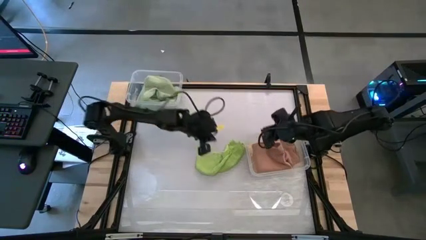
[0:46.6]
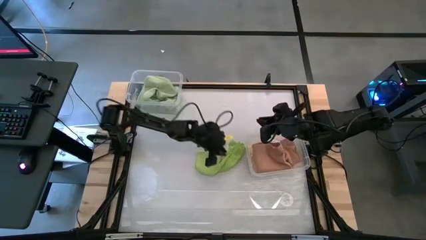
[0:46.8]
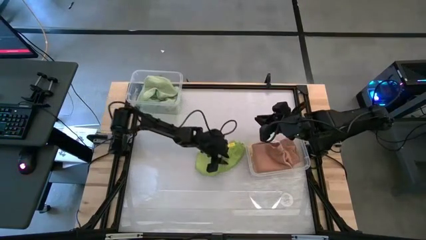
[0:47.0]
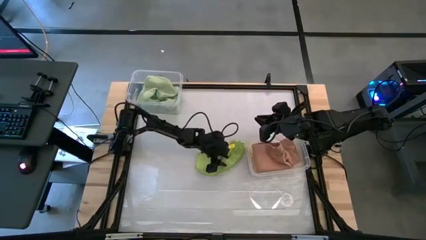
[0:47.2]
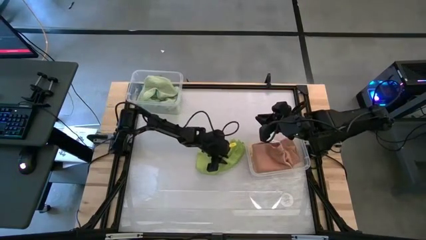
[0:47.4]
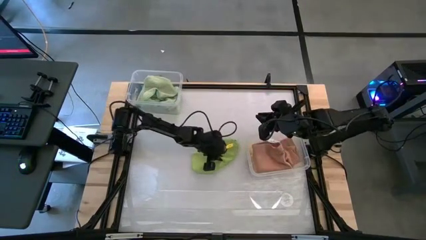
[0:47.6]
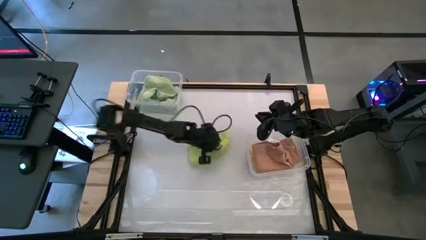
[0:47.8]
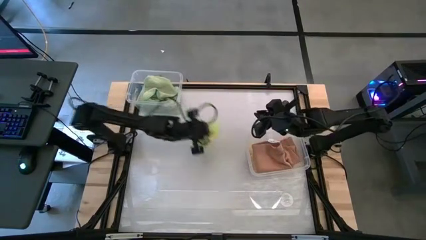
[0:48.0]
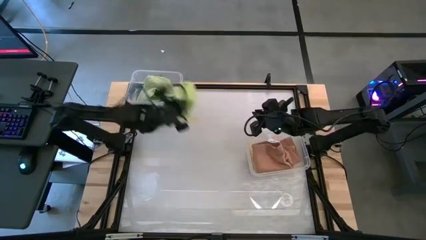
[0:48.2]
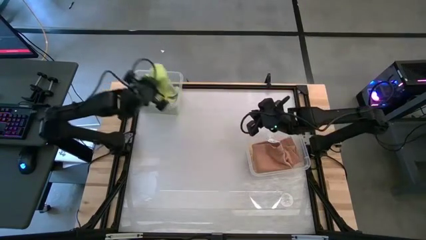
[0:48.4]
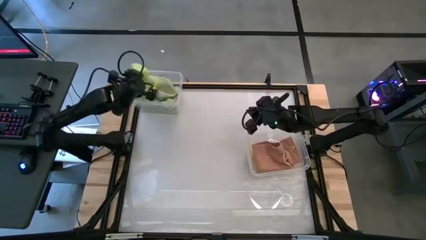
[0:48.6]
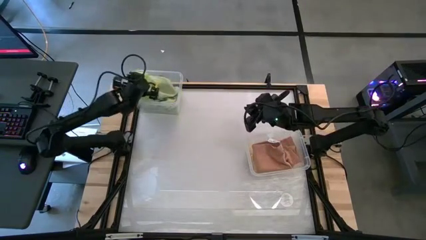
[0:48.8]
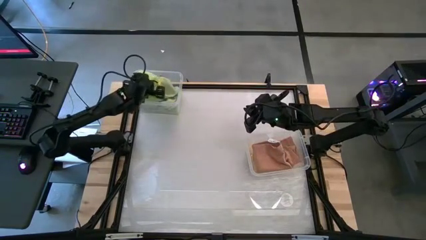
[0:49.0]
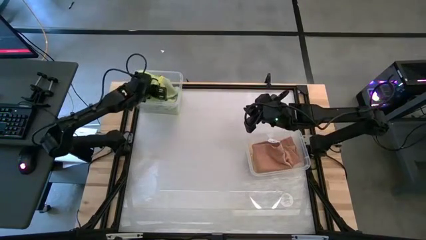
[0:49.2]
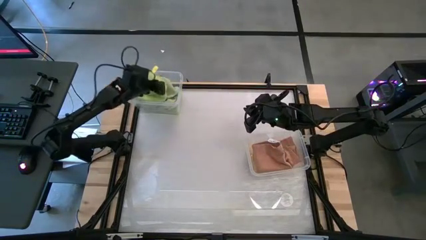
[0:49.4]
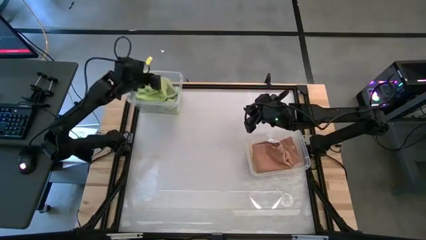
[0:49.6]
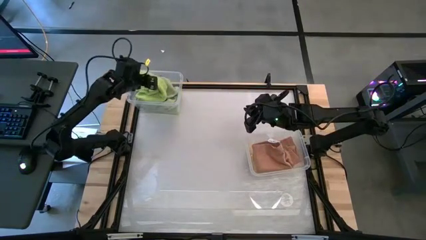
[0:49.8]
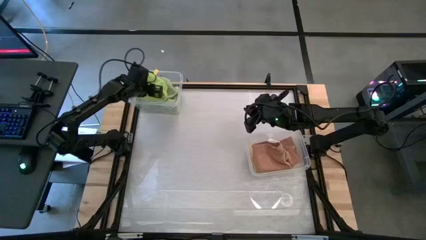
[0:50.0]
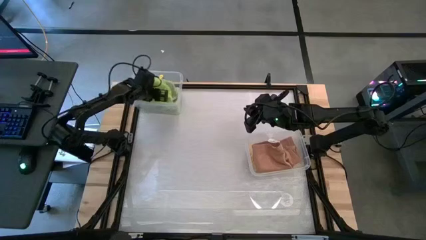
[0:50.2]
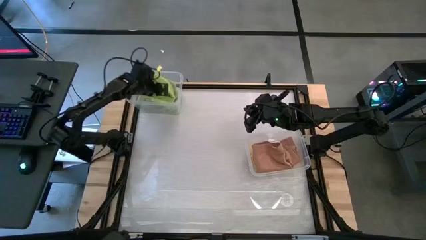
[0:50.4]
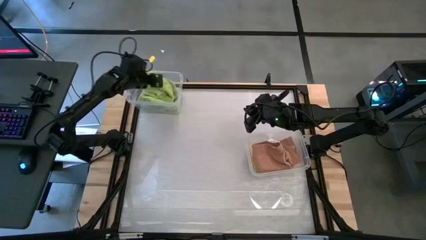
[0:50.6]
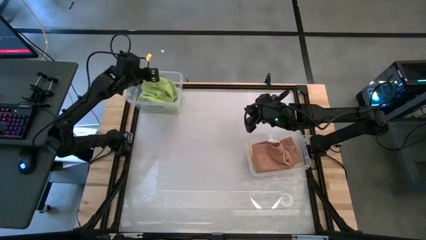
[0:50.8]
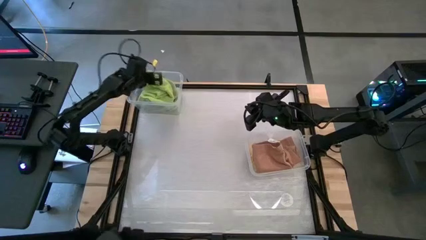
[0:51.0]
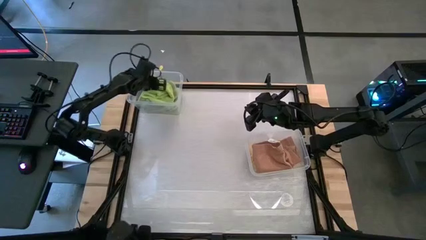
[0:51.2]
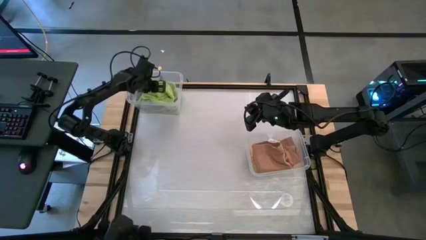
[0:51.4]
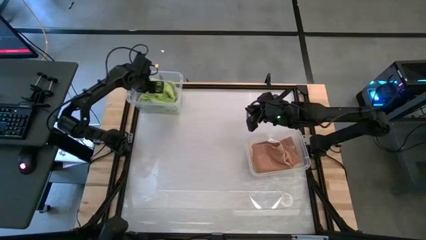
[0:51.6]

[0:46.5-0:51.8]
Task: Sort towels by color in basket
Put the green towel into the left transparent bin

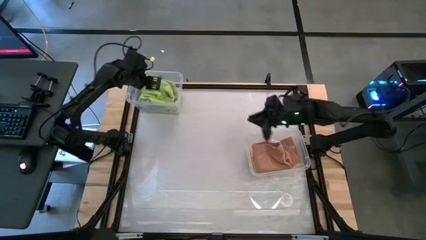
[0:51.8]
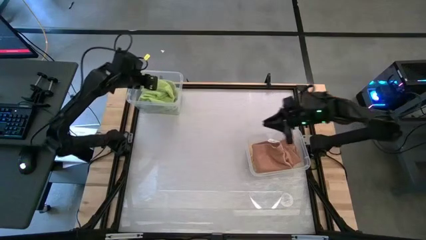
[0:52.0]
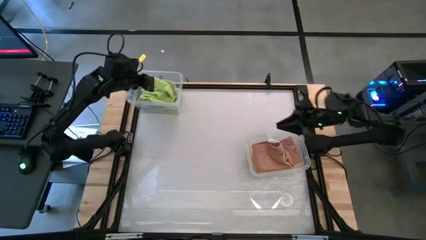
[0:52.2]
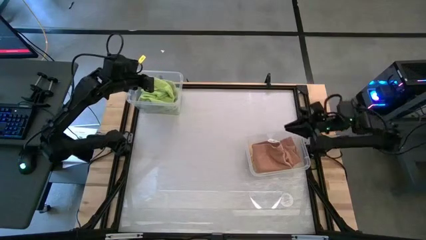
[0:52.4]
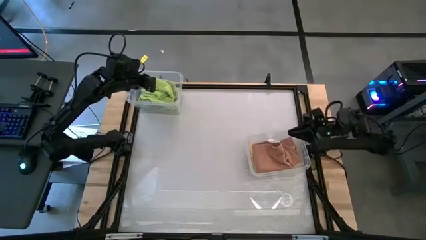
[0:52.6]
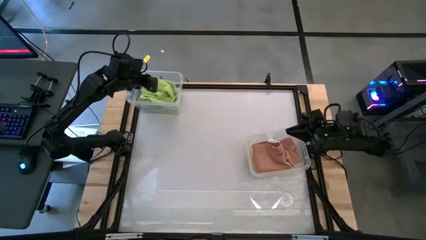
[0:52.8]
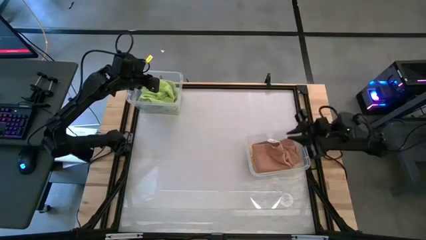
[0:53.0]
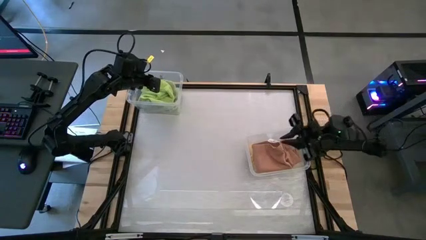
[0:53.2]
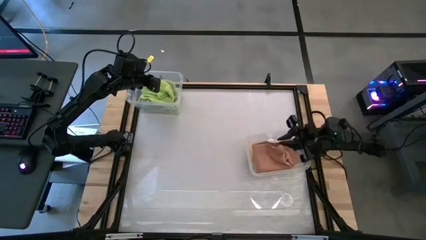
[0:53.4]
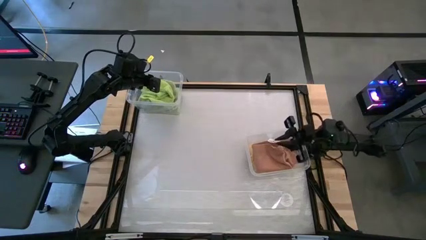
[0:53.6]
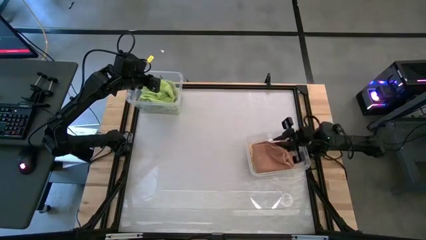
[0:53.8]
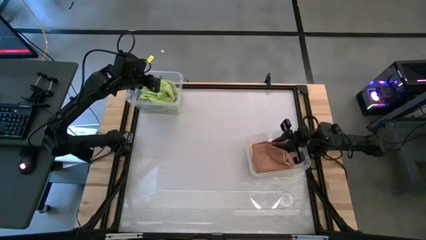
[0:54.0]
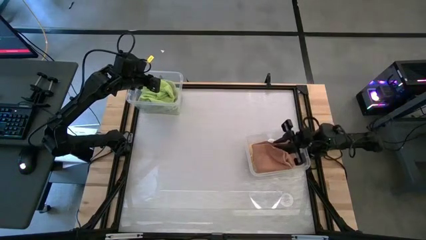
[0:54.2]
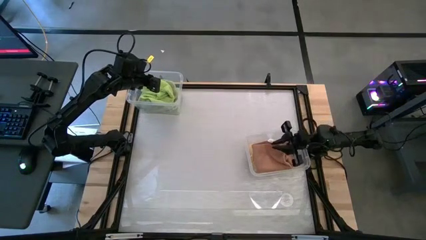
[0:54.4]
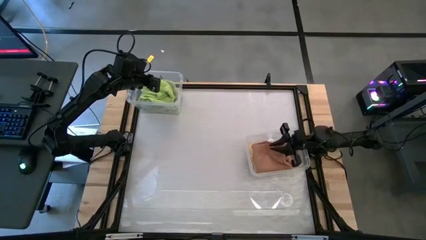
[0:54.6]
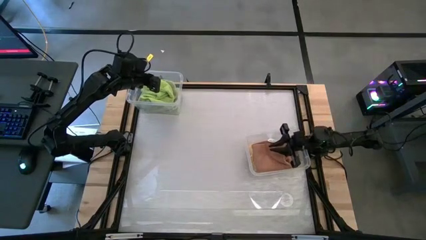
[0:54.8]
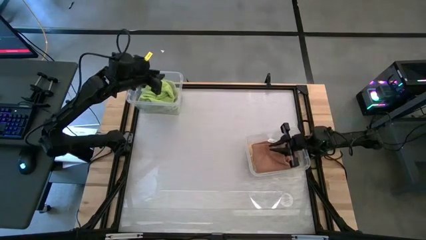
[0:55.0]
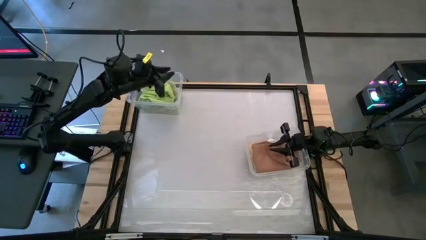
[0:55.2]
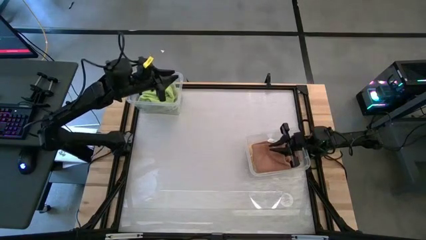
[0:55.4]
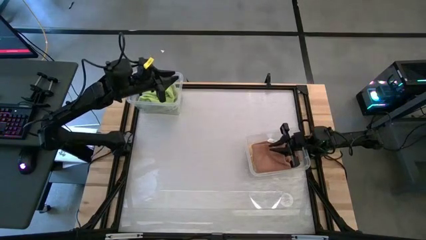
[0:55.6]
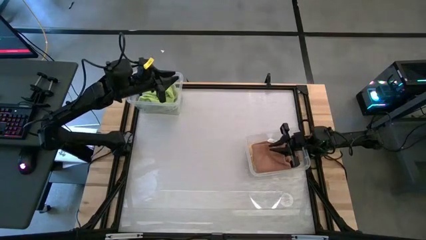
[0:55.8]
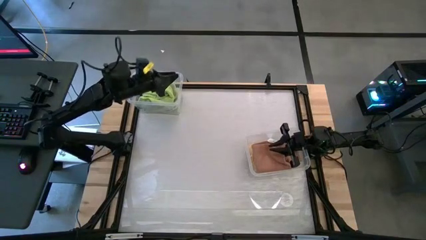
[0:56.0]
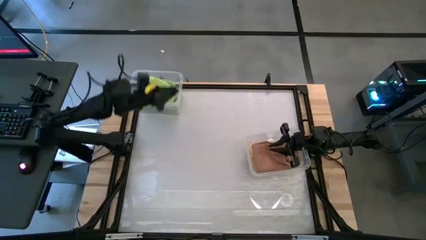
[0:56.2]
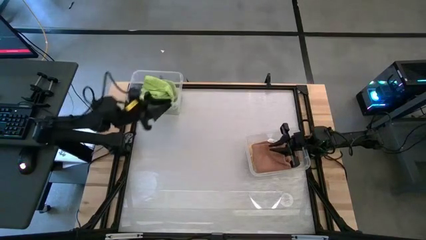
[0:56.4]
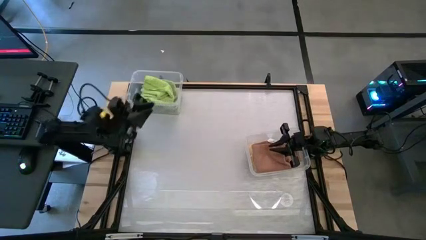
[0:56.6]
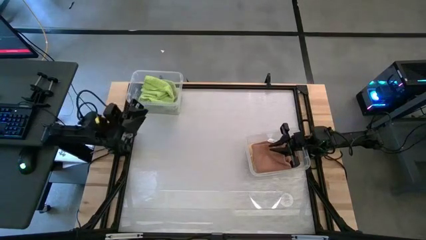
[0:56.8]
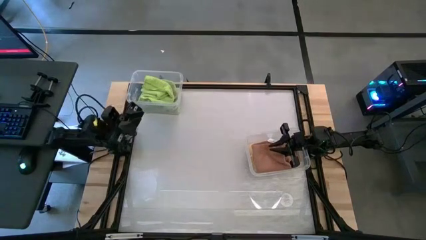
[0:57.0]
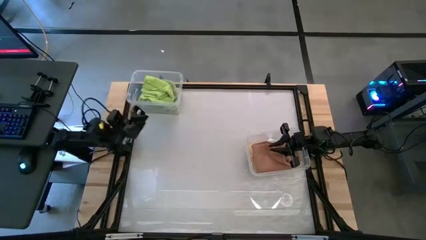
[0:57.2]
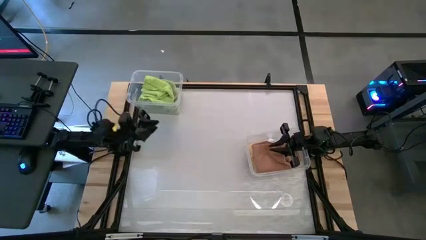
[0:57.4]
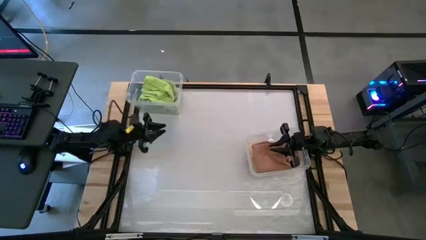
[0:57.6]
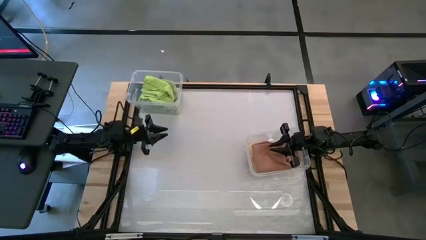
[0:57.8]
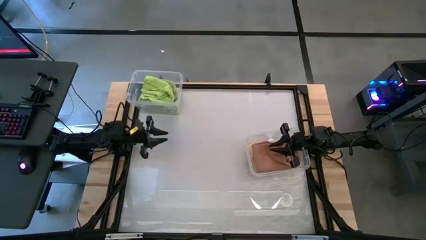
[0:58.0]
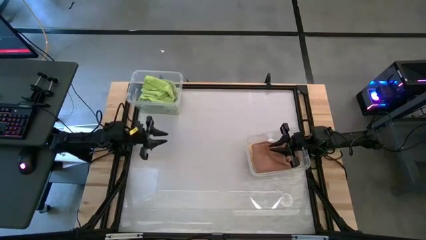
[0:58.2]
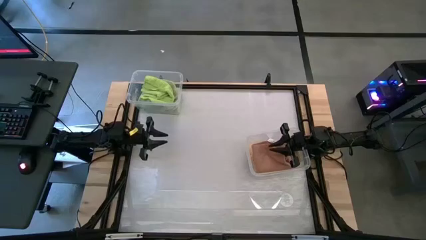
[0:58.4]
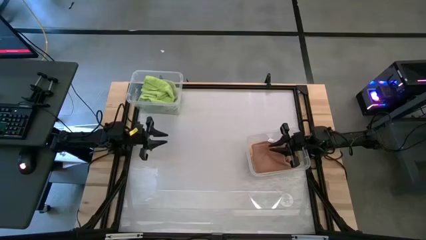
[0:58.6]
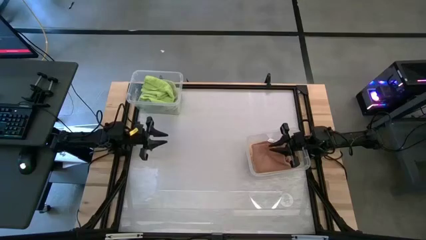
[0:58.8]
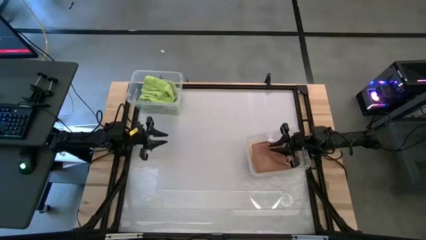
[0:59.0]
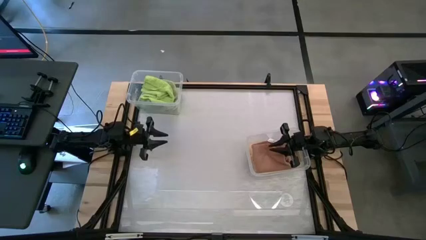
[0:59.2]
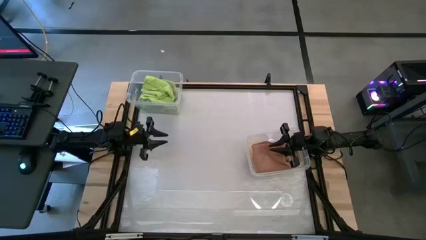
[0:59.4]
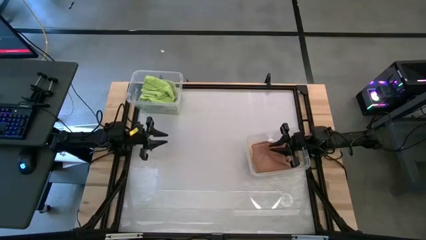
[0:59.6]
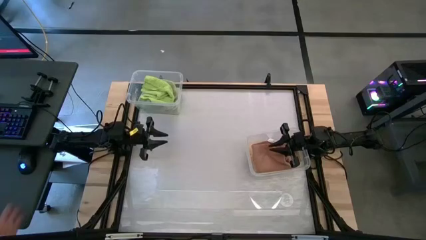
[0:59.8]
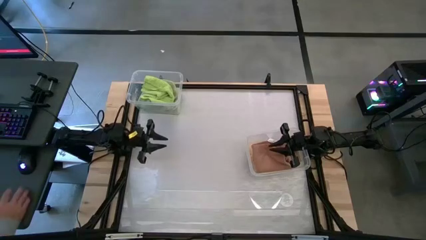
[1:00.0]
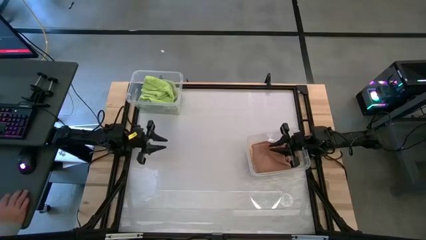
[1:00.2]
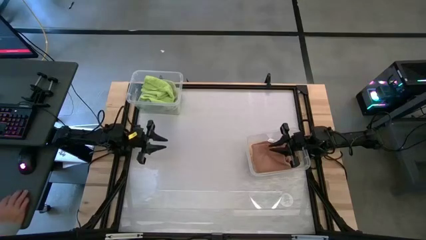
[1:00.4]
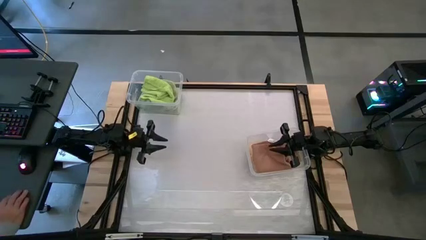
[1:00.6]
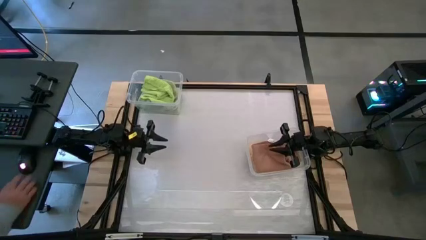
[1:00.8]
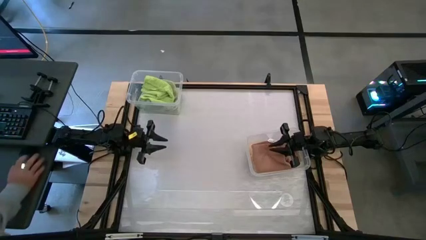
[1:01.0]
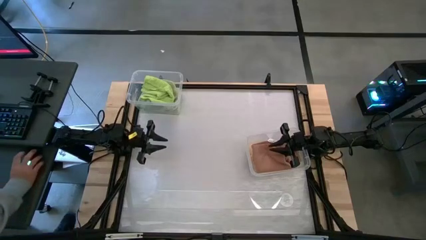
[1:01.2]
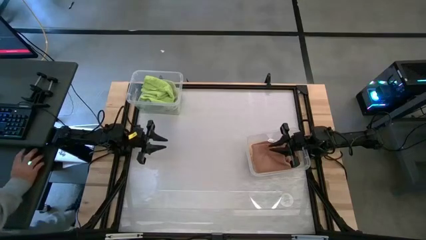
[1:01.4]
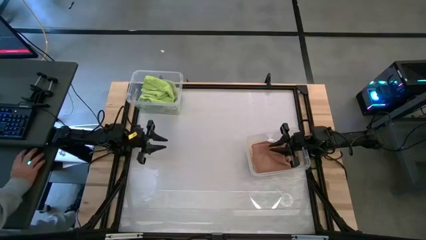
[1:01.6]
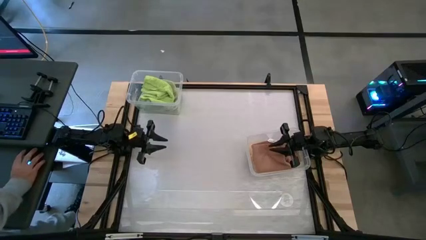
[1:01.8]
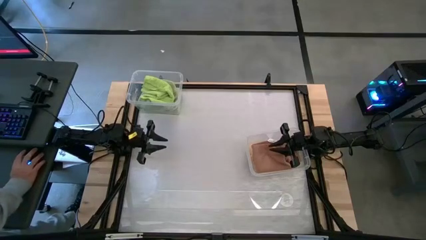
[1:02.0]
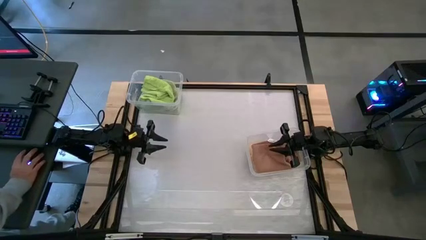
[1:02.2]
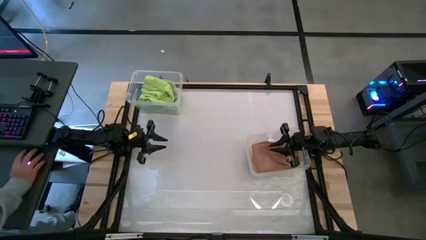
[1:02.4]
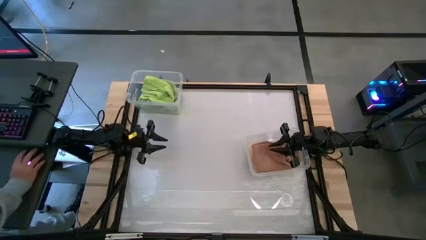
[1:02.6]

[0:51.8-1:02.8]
Return to Home Position
